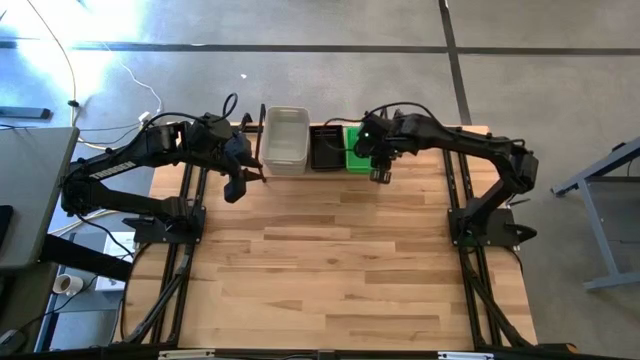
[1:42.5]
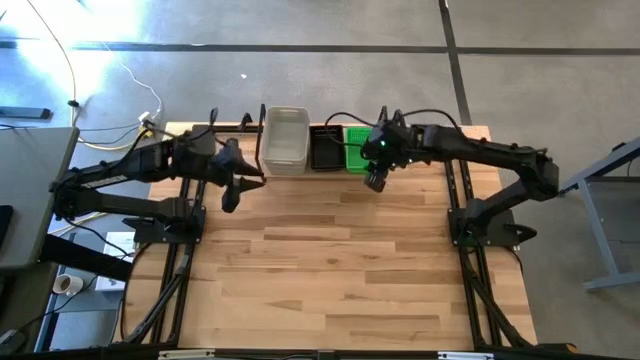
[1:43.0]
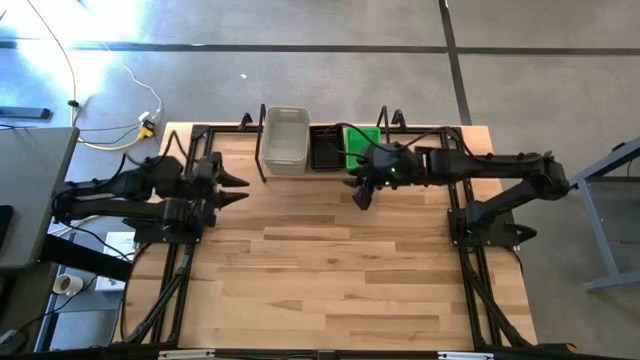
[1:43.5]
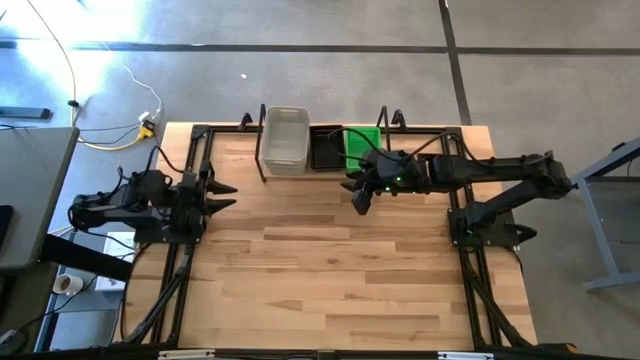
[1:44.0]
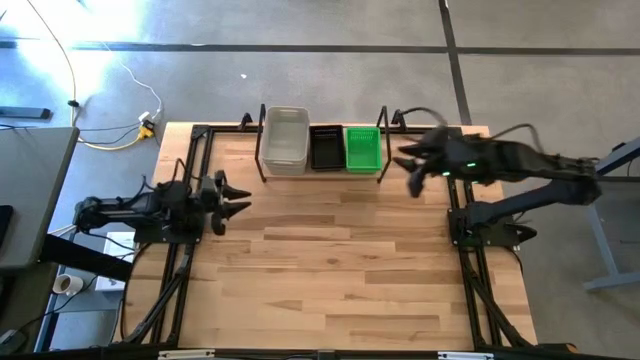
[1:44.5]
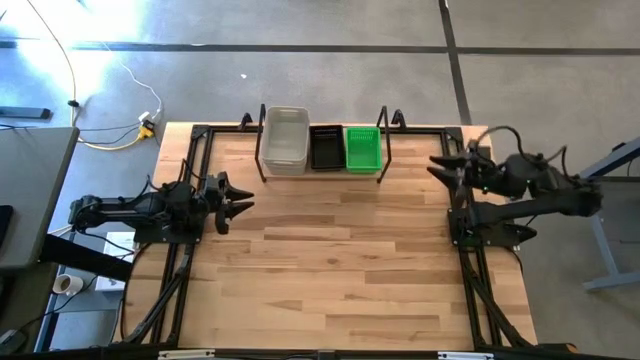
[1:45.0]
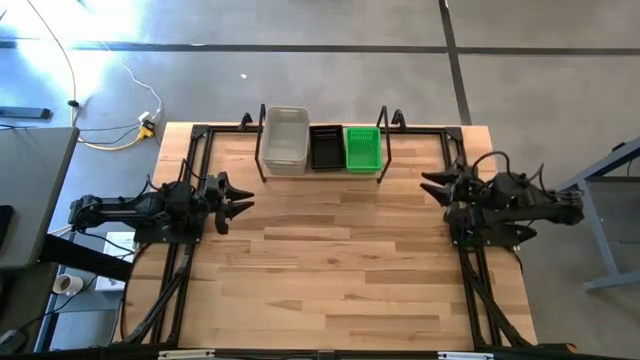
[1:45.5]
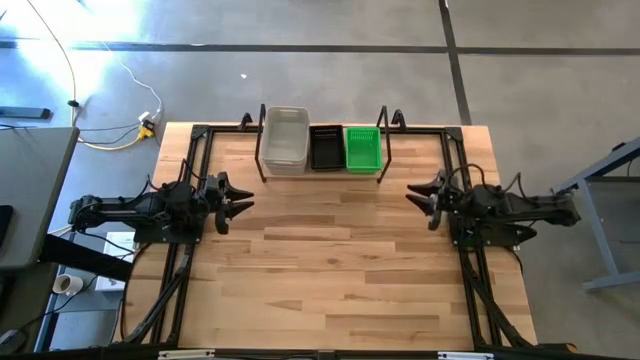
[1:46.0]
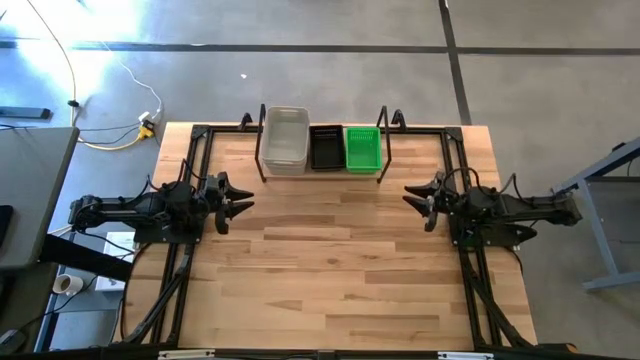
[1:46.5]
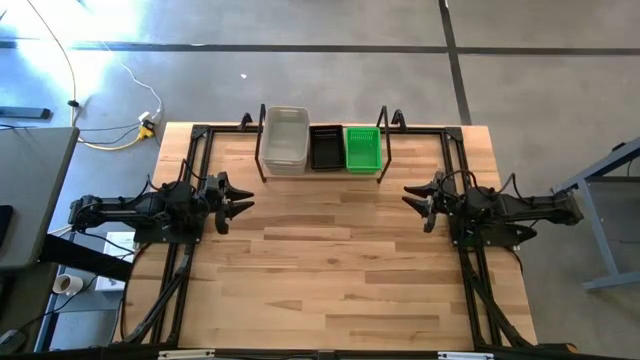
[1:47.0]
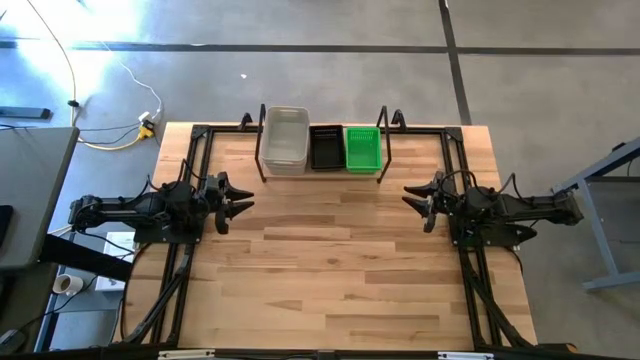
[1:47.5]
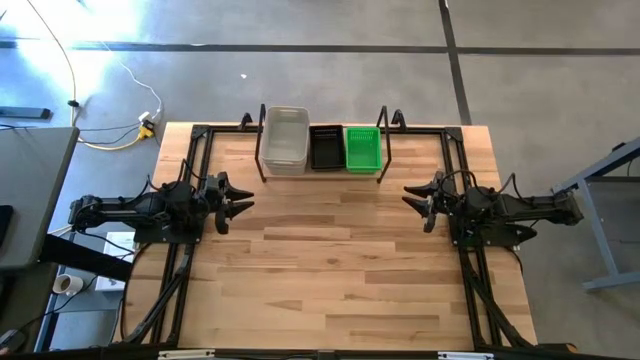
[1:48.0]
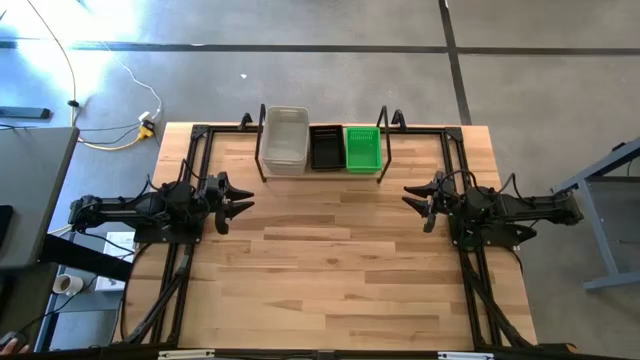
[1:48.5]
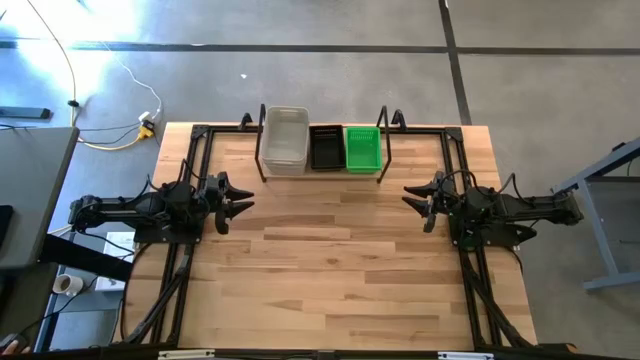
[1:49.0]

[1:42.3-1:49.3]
Task: Stack baskets on shelf by color
Return to Home Position

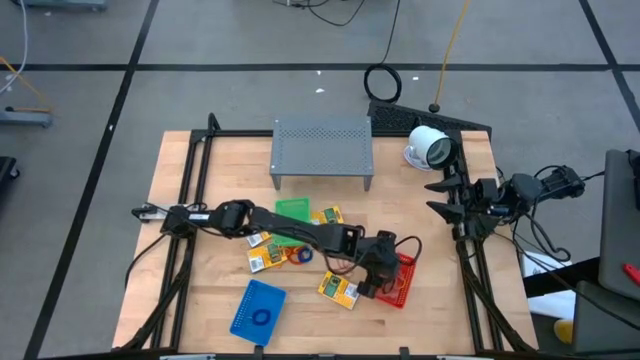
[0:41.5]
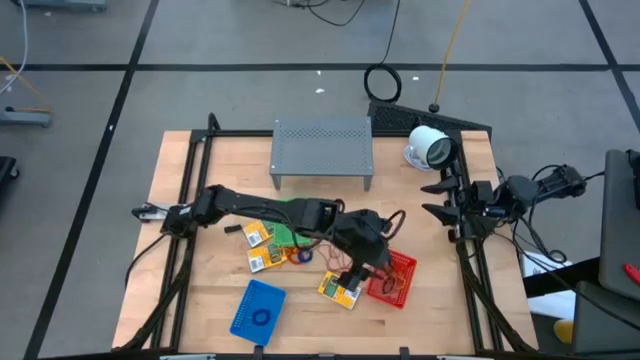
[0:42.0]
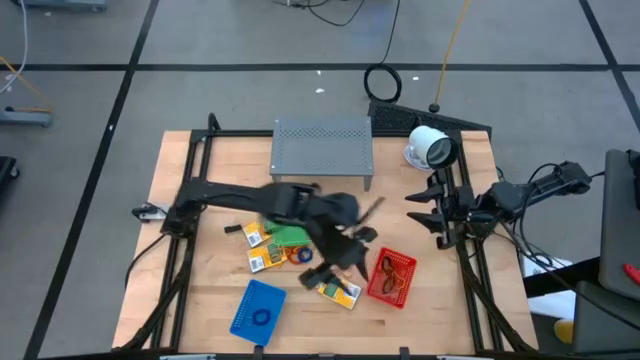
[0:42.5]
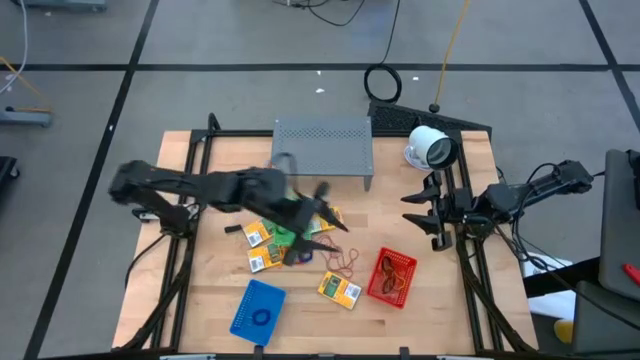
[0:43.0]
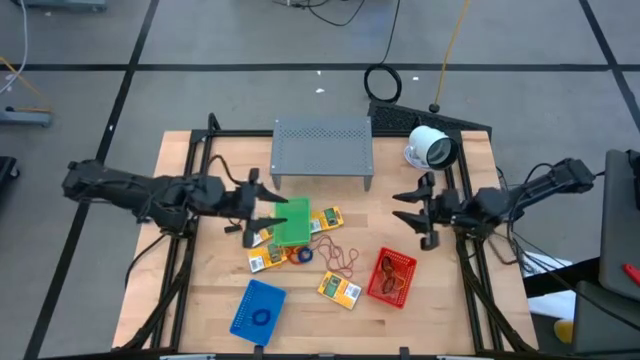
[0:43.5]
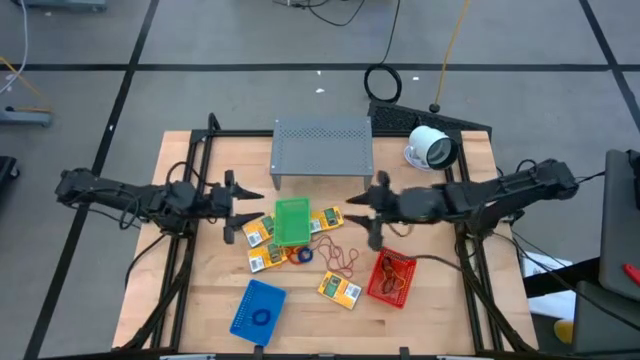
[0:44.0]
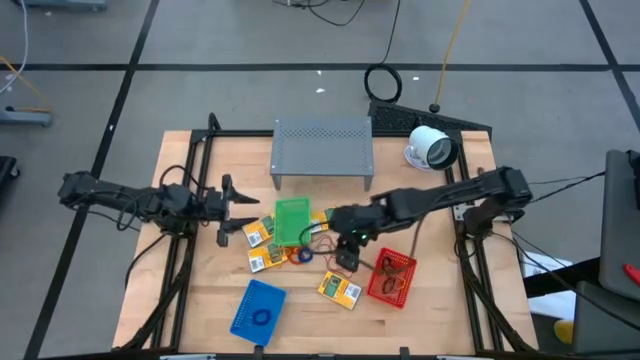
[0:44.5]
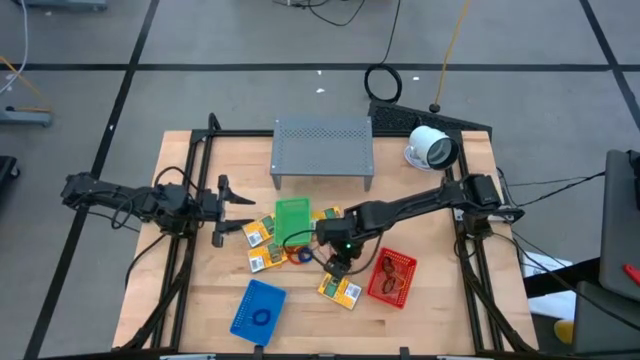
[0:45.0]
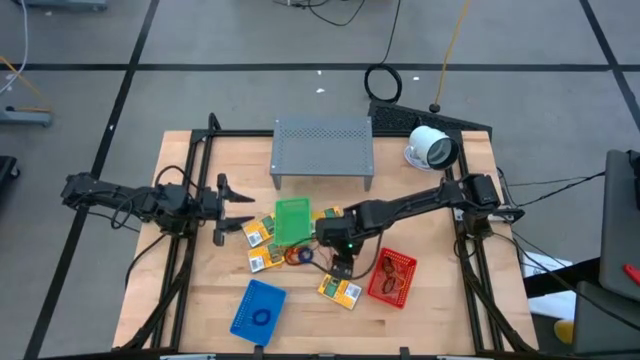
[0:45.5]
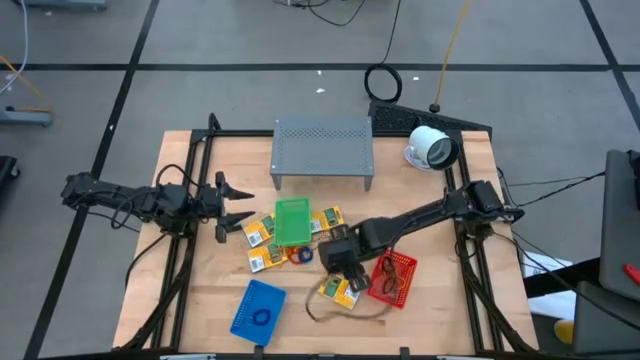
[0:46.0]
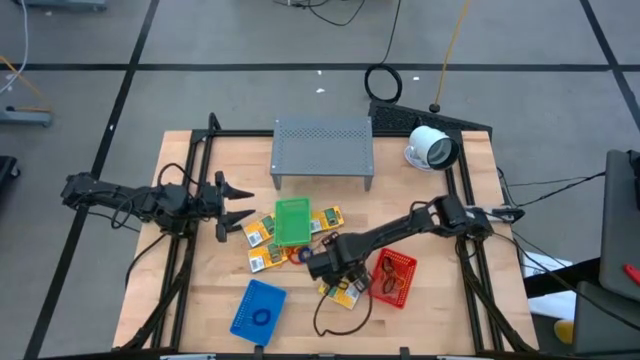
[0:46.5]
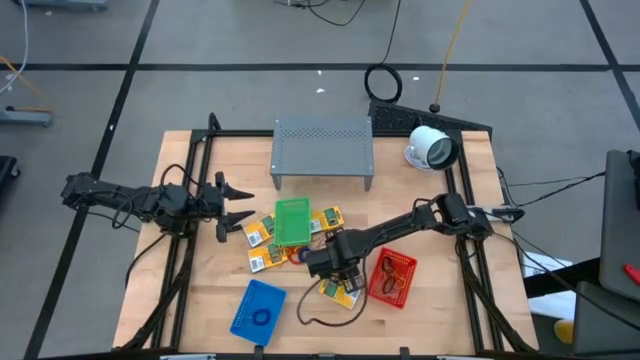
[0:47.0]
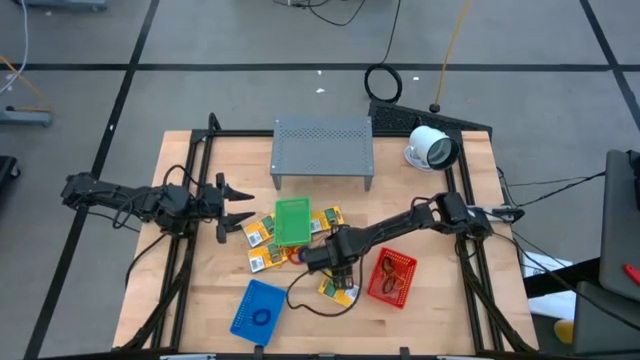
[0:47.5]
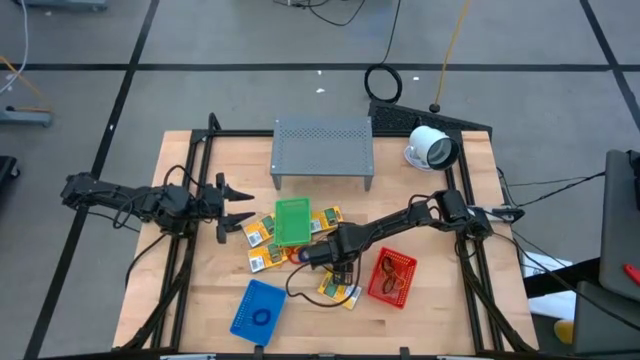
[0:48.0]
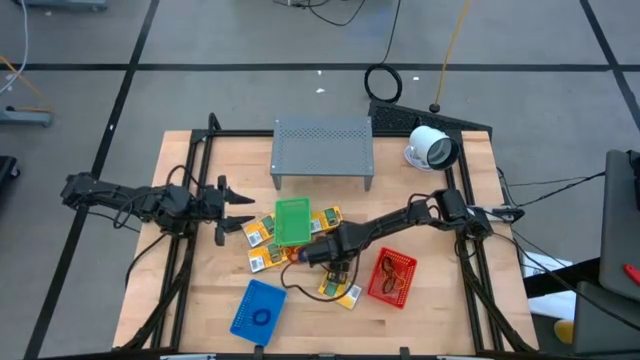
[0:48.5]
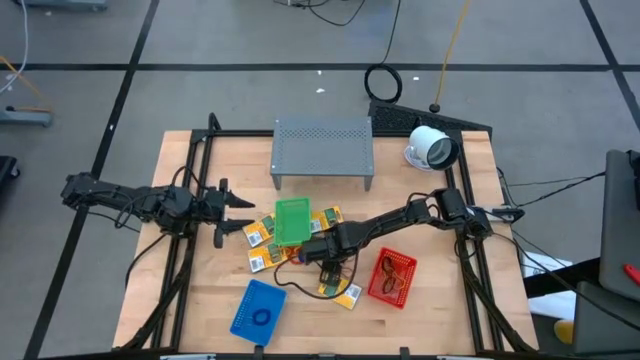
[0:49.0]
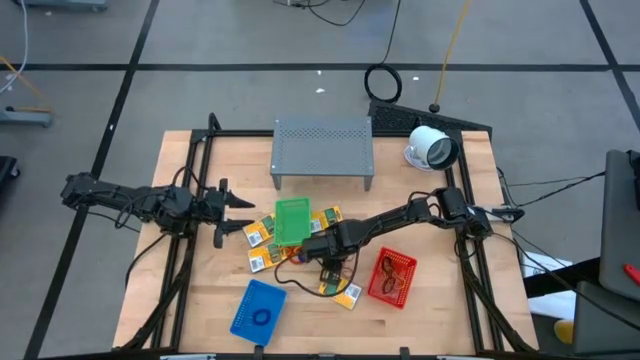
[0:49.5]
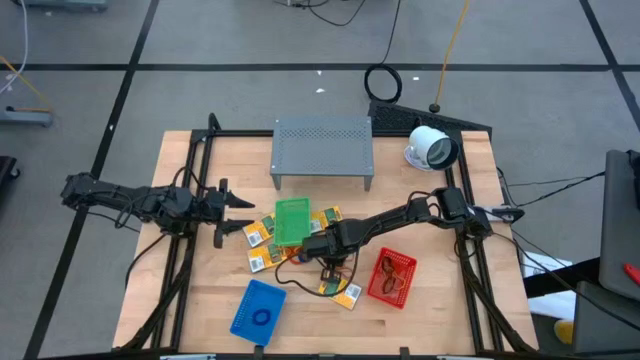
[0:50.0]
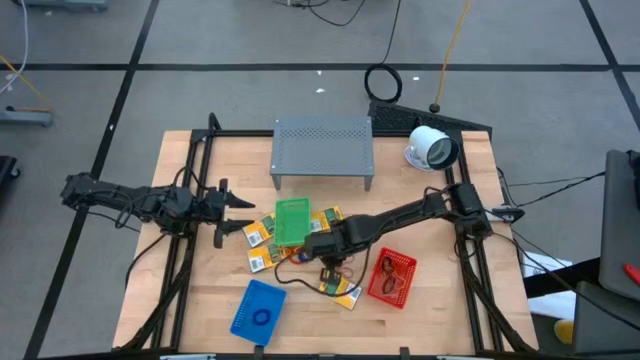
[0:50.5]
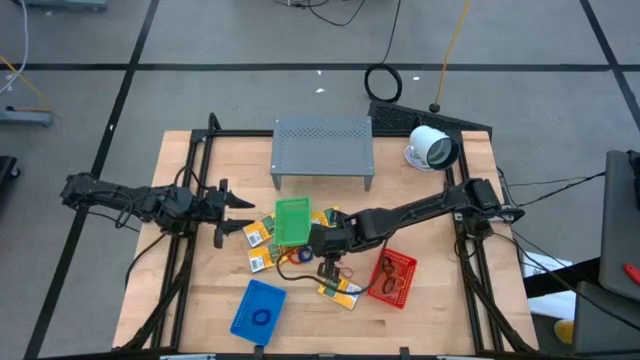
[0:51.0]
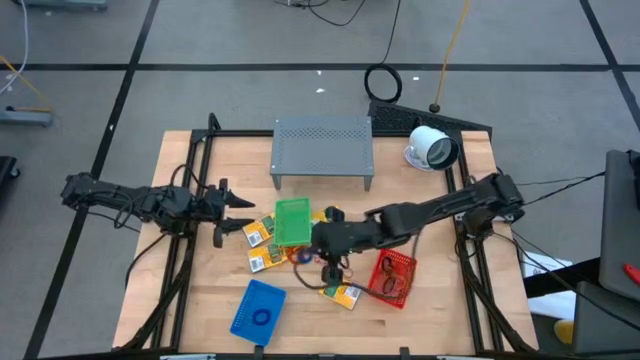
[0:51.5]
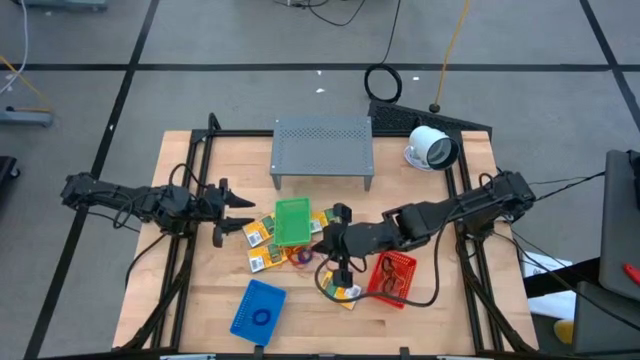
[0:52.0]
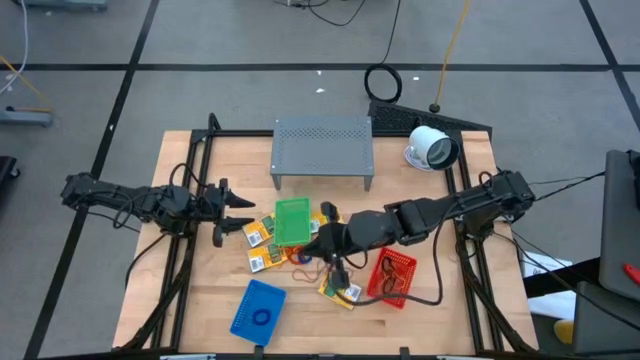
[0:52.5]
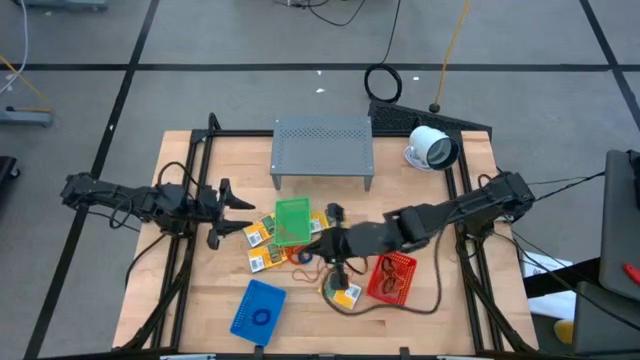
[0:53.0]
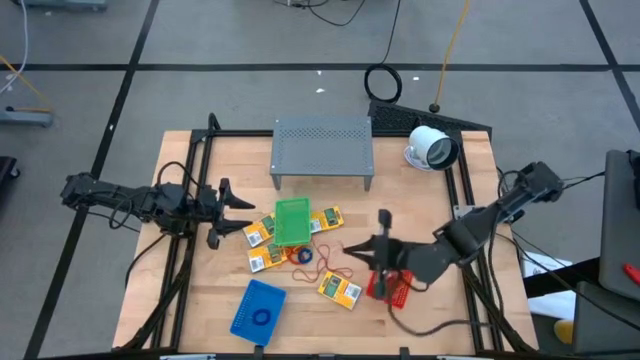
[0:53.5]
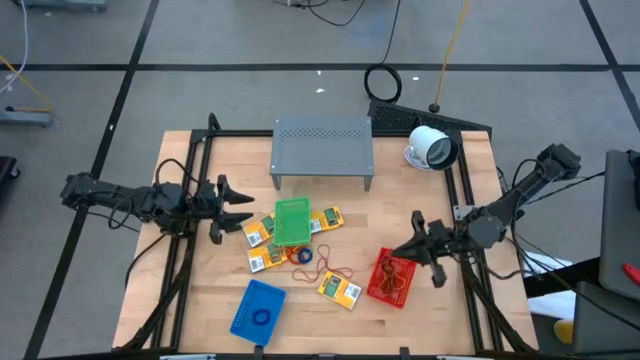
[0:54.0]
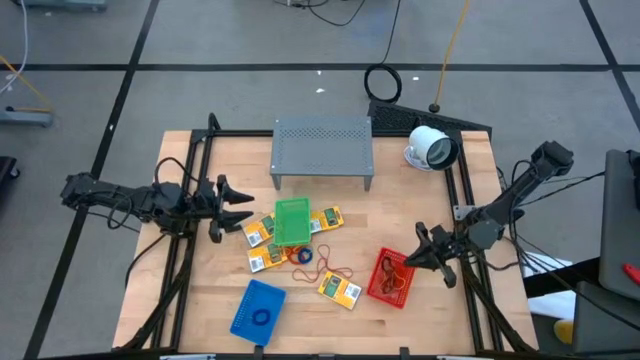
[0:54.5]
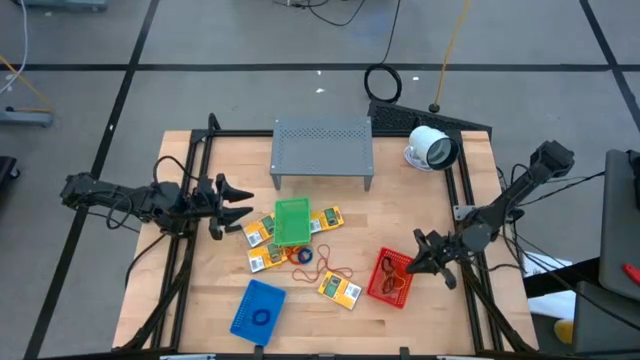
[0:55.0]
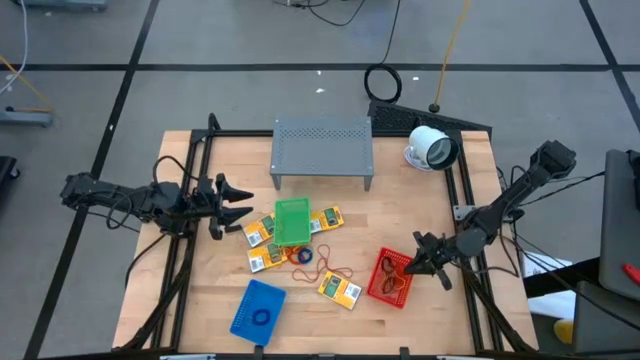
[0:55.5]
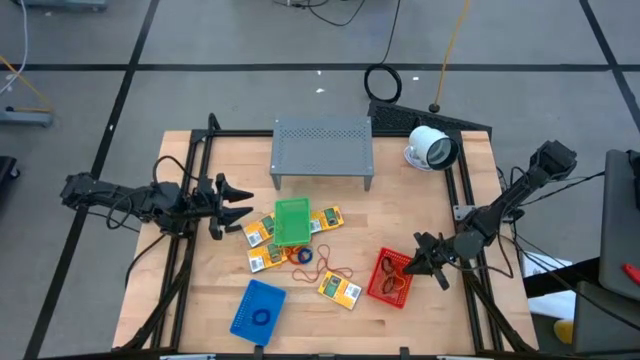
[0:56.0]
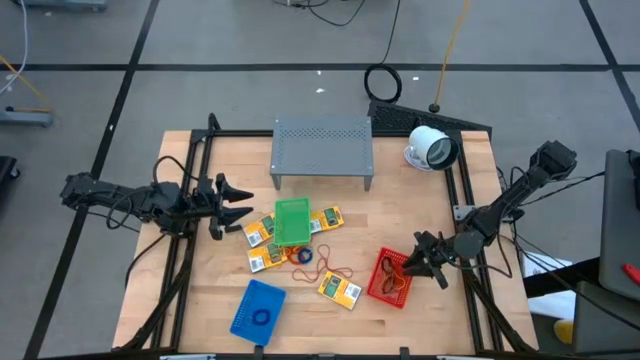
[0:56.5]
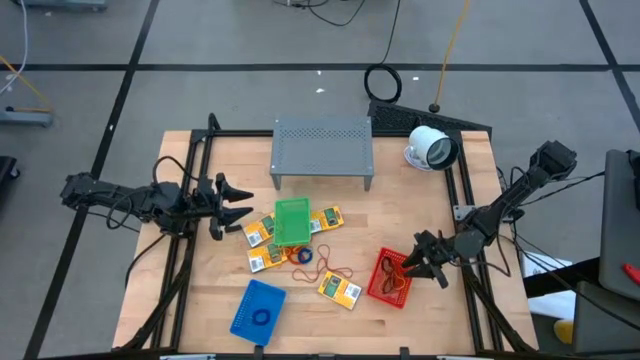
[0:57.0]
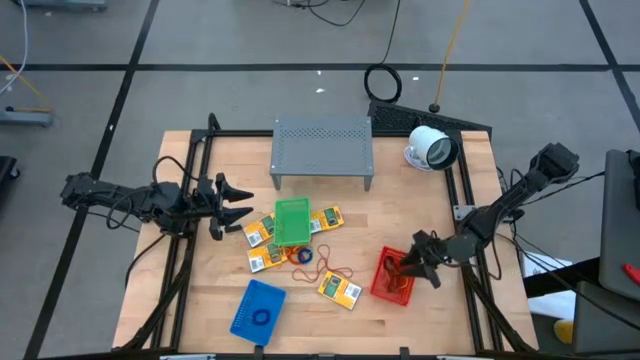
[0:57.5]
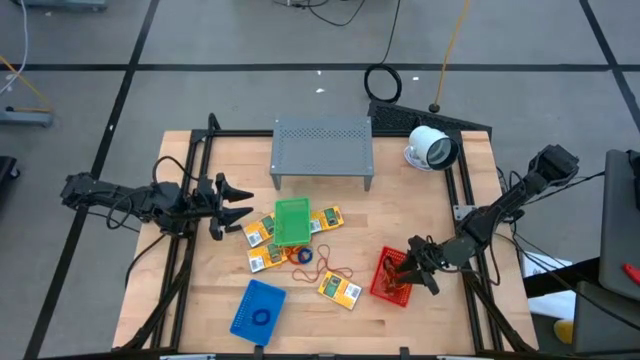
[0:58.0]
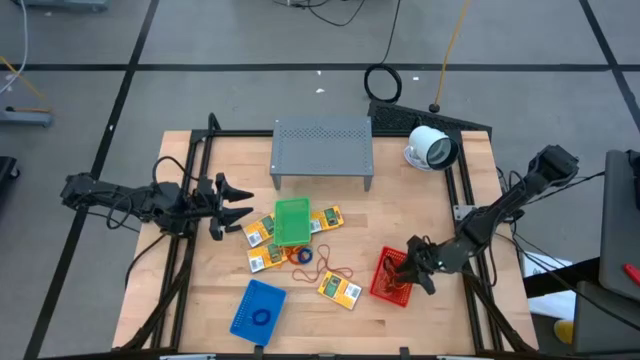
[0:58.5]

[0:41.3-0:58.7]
Task: Pick & Place Office Desk Supplies
Put the red rubber band into the red bin
